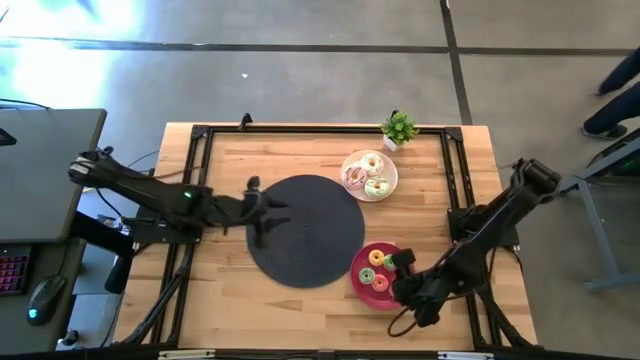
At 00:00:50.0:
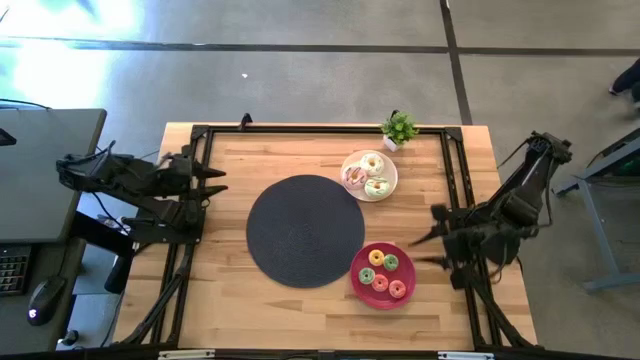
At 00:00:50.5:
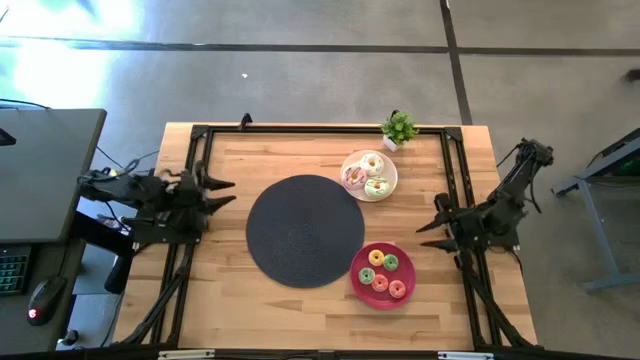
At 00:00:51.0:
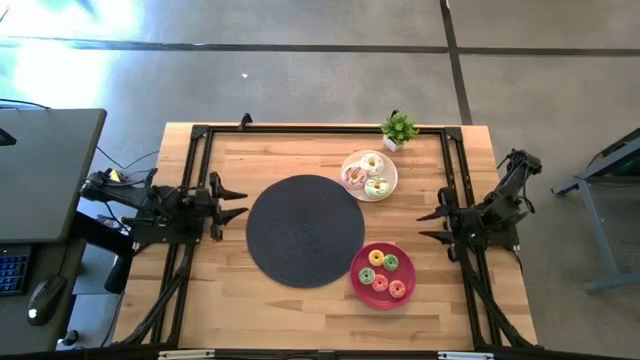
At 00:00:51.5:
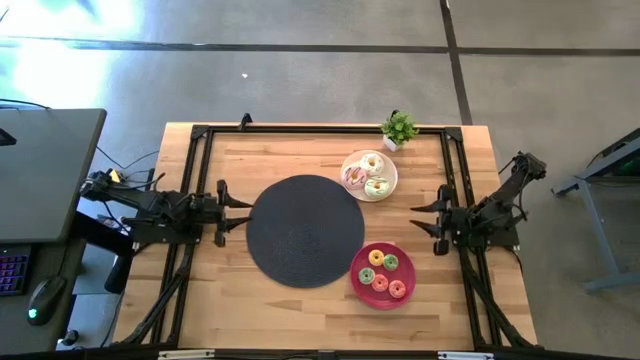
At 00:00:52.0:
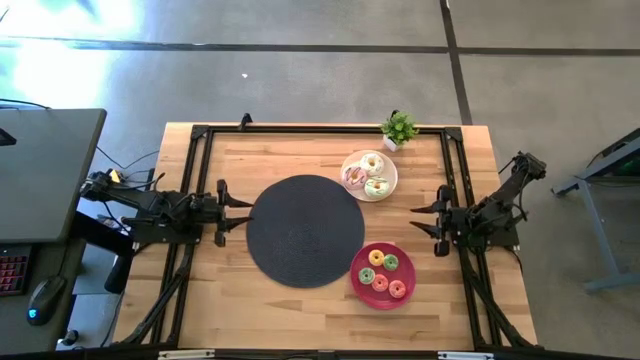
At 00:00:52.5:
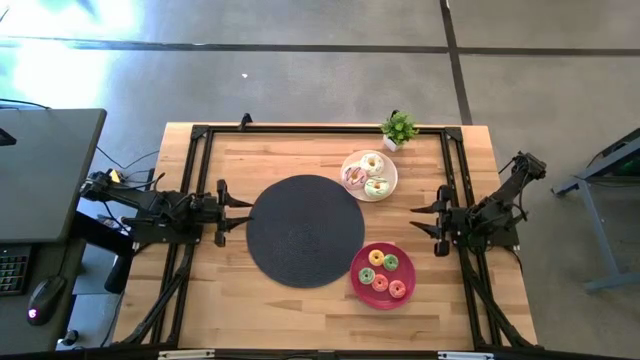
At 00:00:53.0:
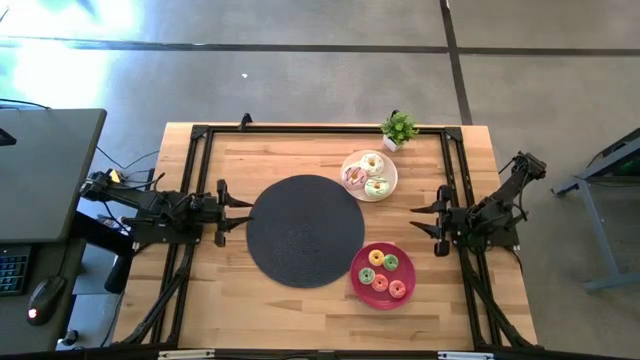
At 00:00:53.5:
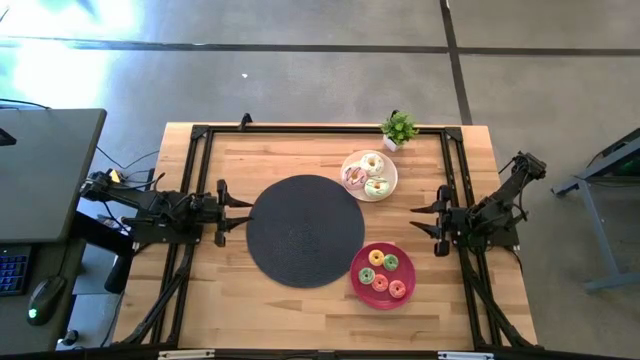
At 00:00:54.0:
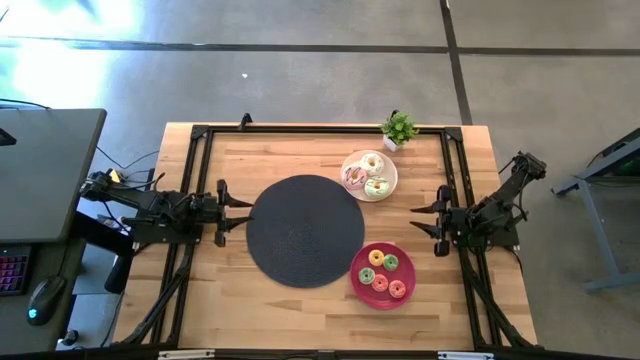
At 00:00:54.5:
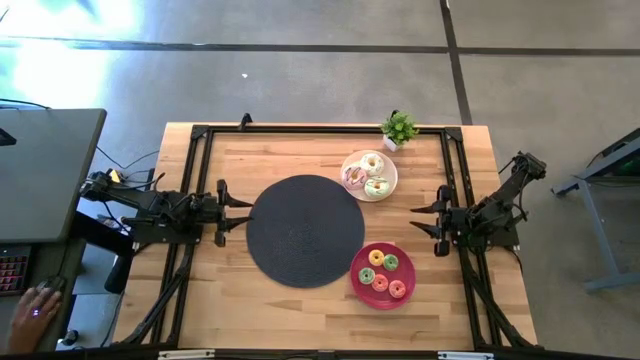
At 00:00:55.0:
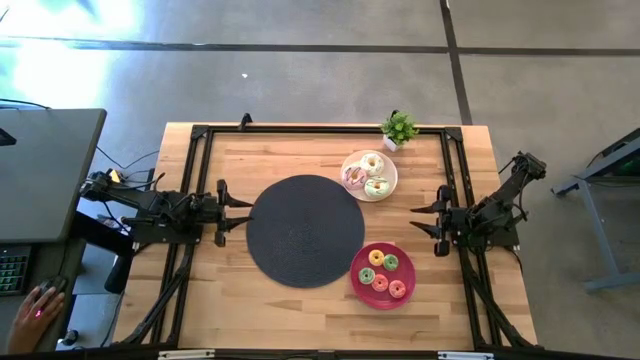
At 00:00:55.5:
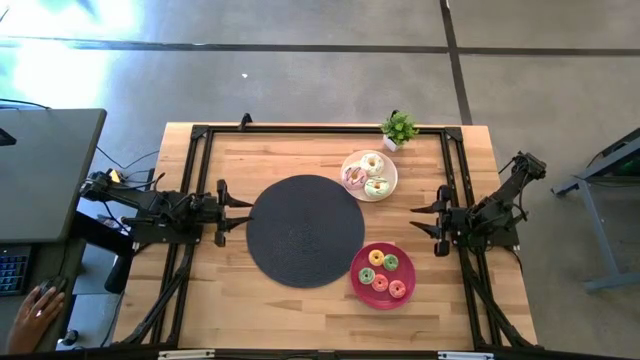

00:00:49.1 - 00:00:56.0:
Task: Pick & Place donuts
Return to Home Position

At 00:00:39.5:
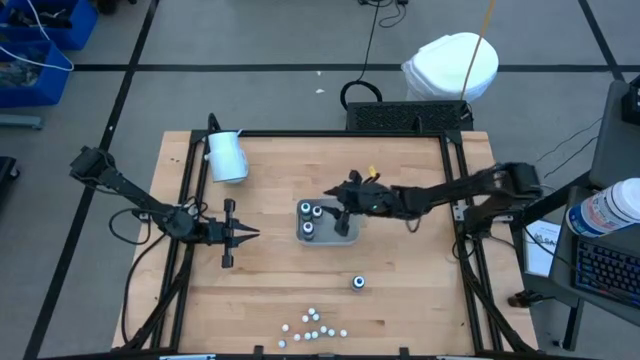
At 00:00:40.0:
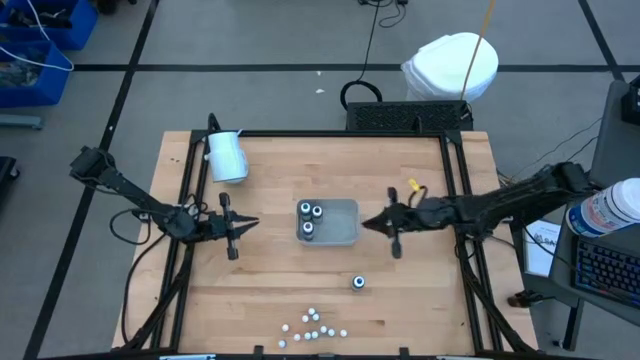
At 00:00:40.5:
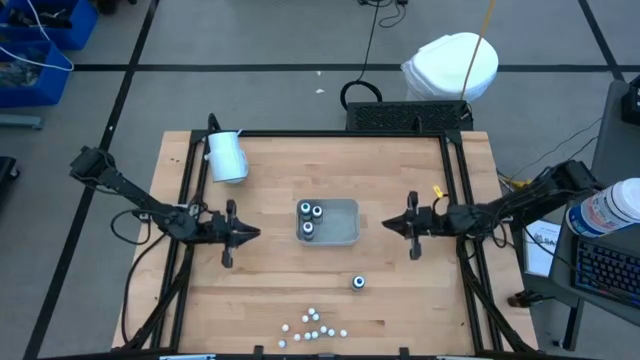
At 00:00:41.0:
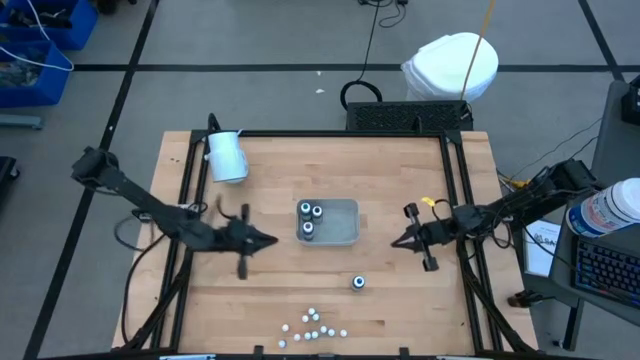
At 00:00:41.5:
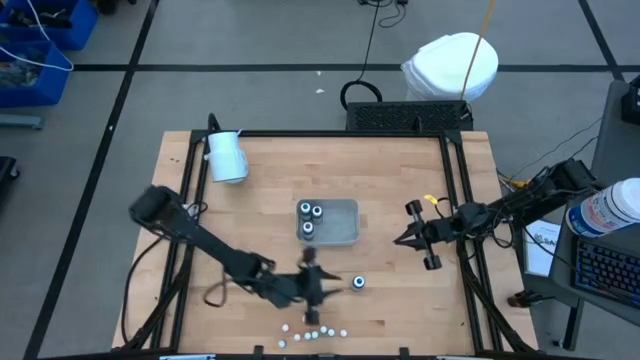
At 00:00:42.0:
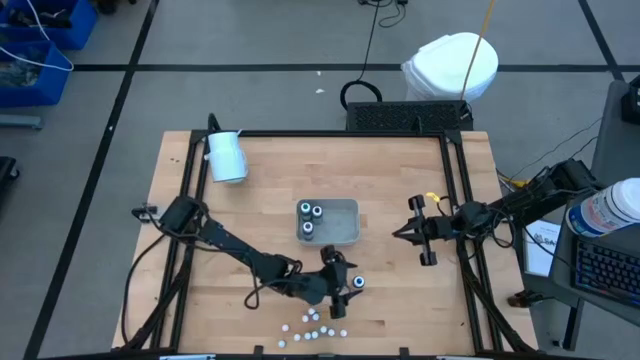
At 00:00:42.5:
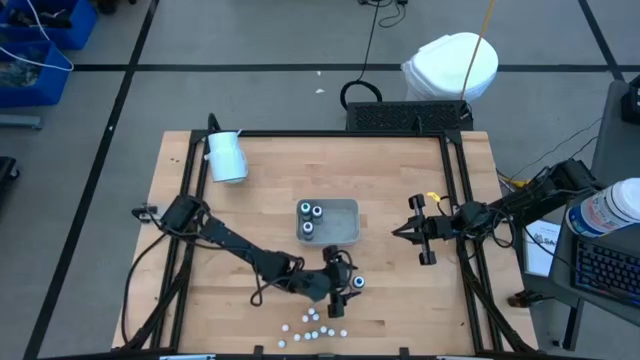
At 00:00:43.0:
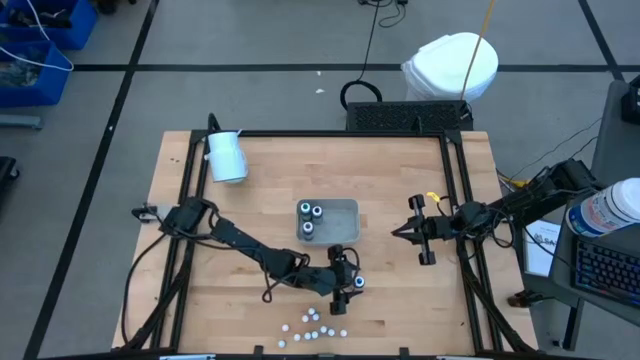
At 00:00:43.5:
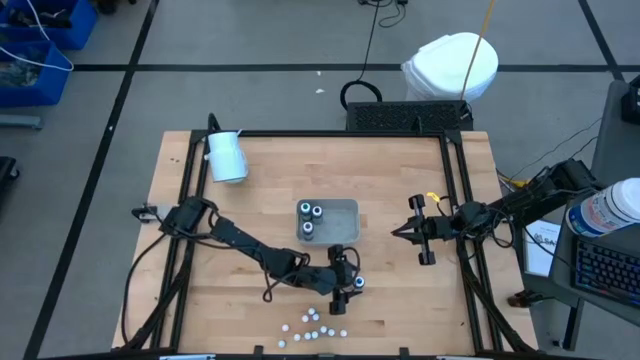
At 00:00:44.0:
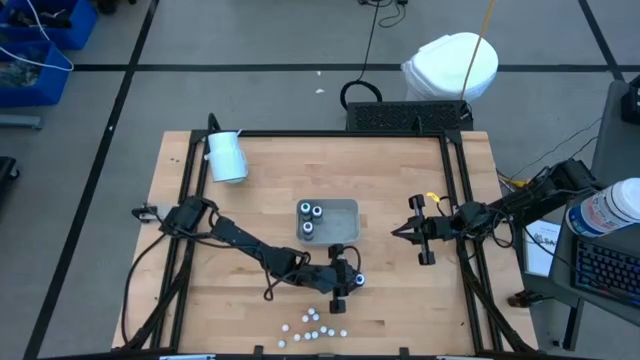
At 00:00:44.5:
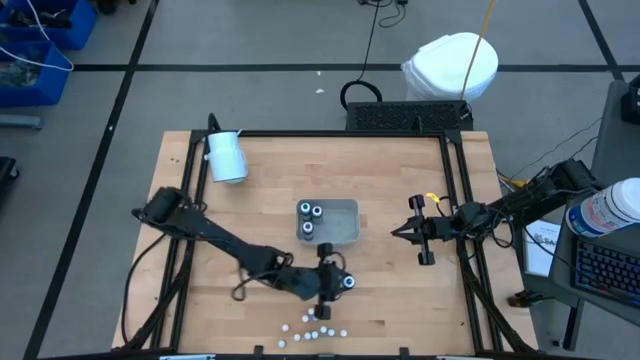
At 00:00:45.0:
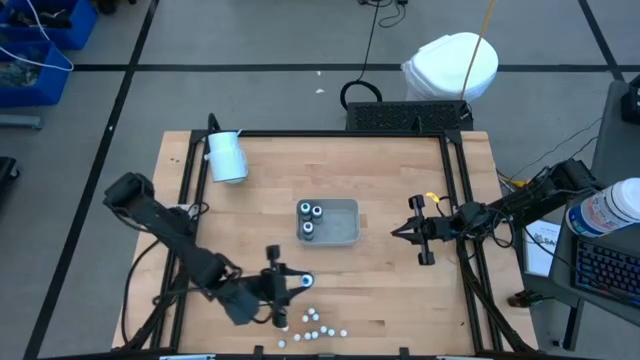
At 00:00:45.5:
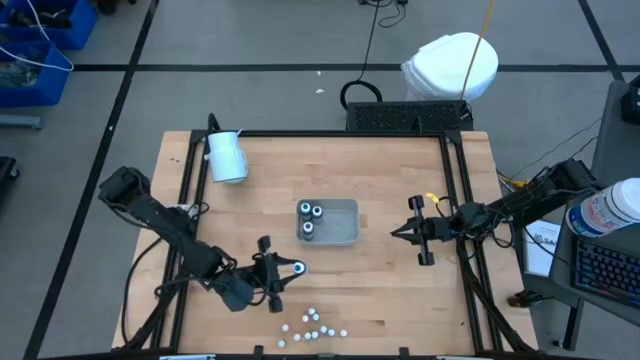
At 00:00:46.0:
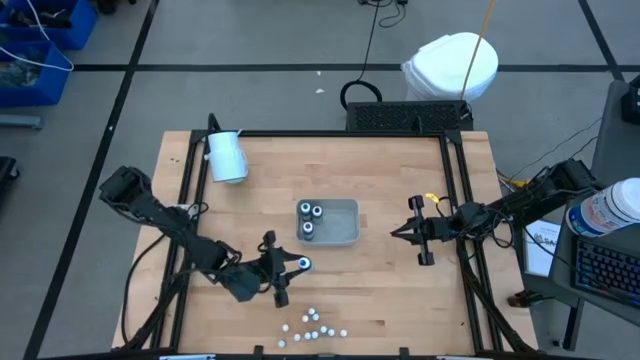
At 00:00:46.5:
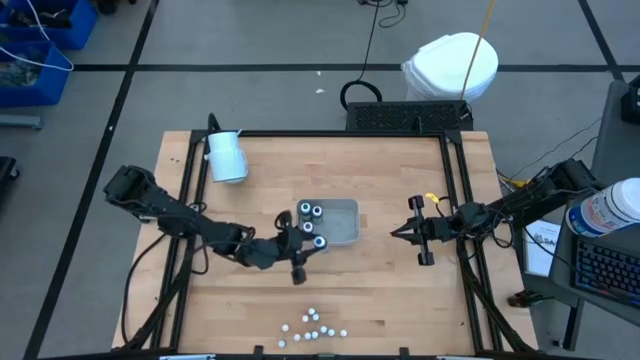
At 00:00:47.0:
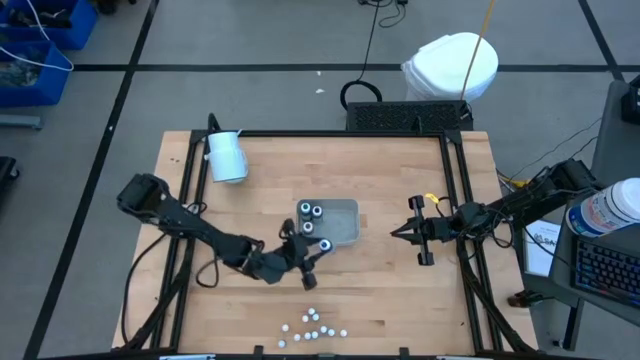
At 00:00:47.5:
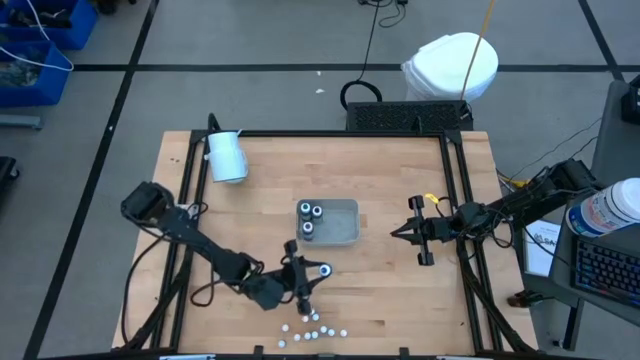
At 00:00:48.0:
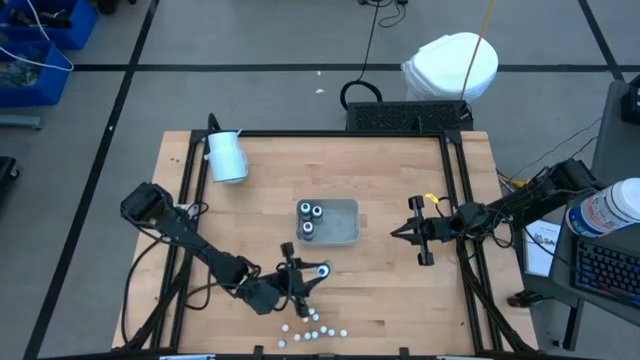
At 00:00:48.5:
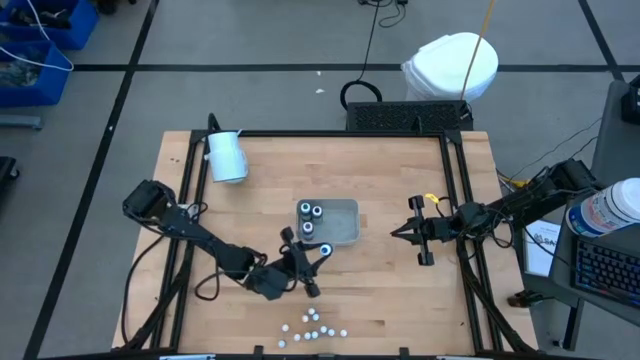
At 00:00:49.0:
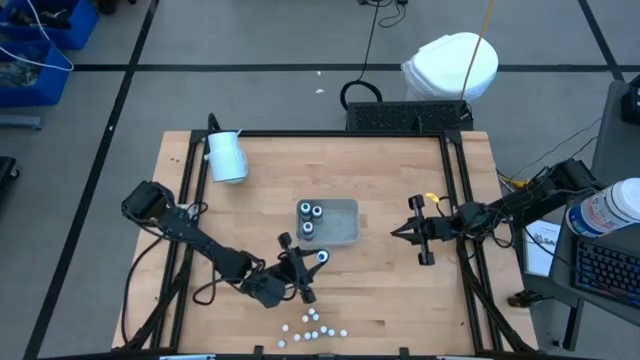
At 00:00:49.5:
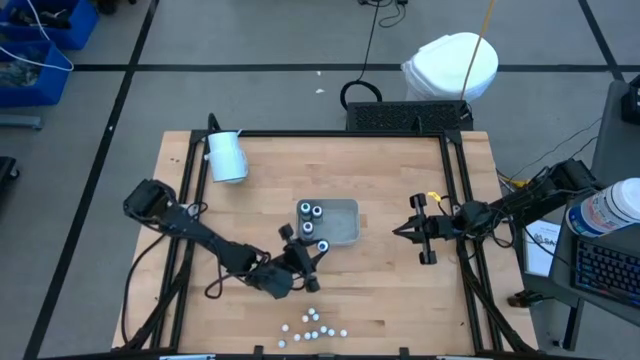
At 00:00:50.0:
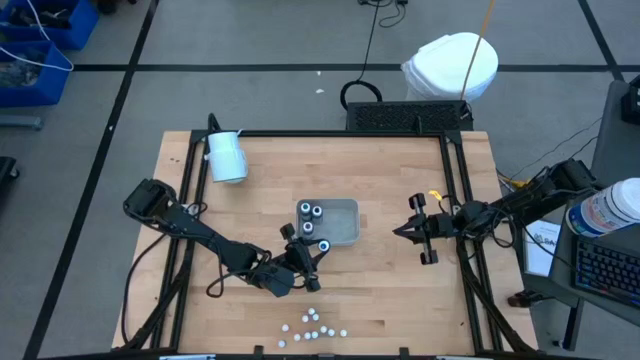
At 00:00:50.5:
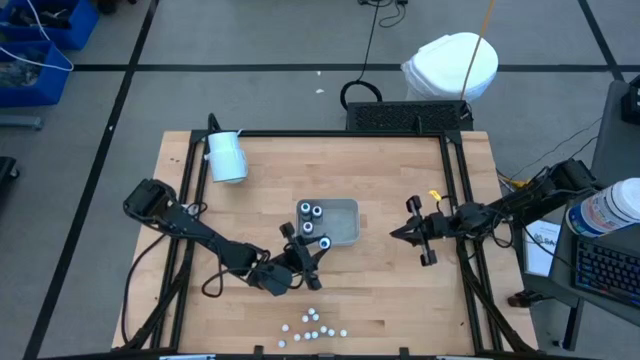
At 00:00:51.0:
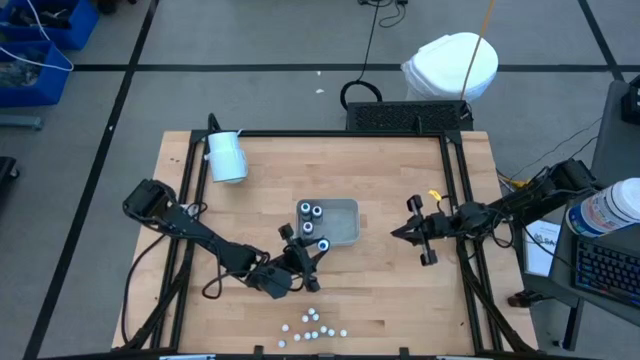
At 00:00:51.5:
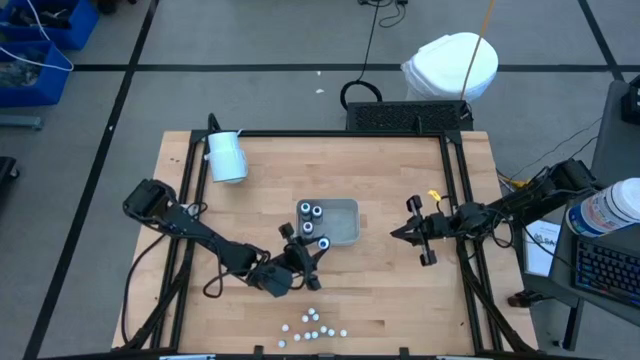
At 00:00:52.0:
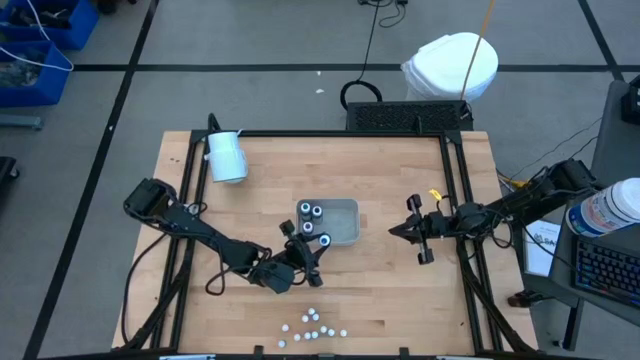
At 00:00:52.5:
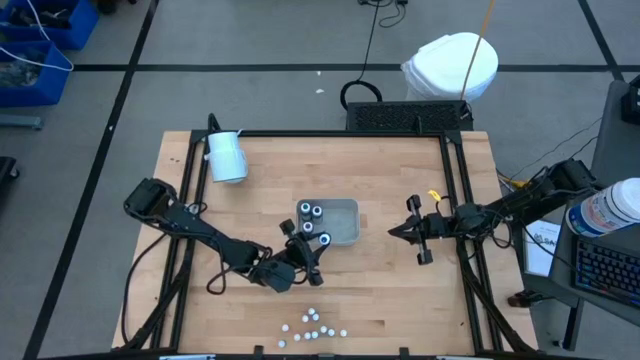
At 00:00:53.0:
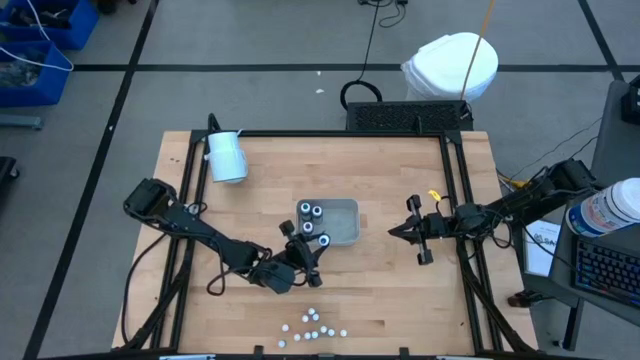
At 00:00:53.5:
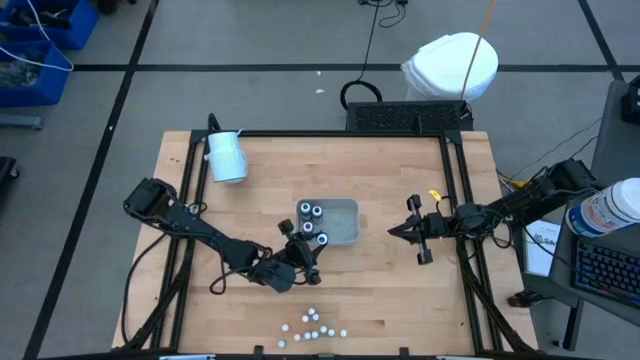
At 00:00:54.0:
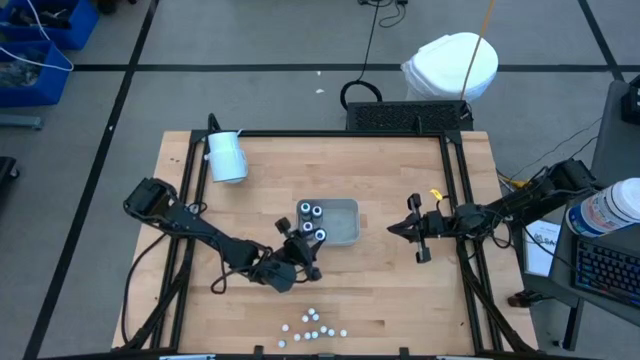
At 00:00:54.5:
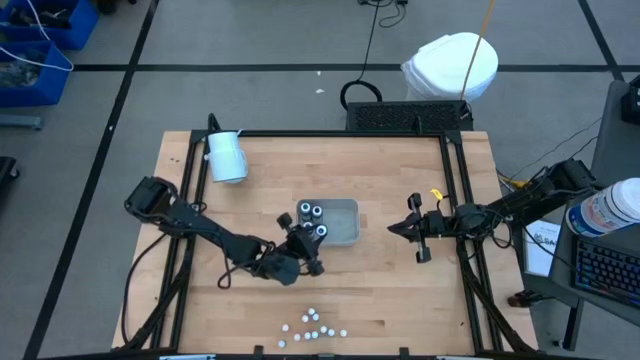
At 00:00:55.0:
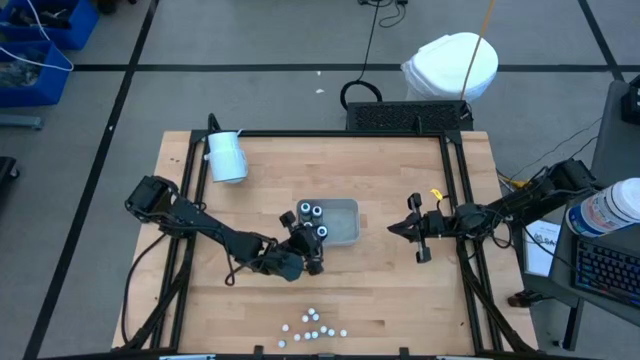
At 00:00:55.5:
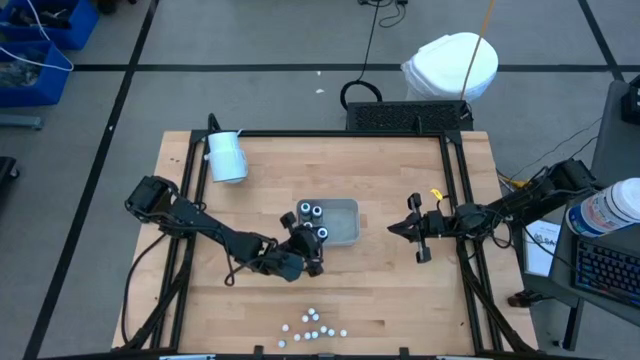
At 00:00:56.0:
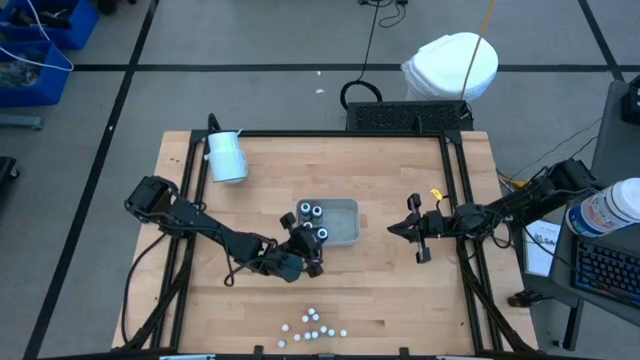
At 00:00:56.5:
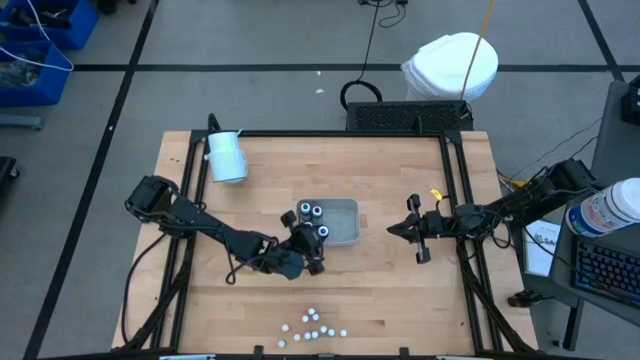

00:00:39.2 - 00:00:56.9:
Task: Pick & Place food coloring
Put the large blue food coloring bottle into the gray bin
